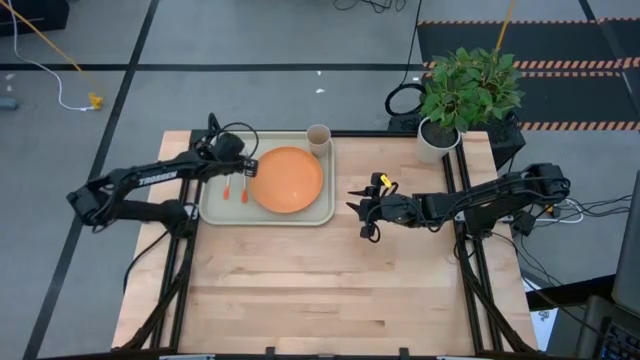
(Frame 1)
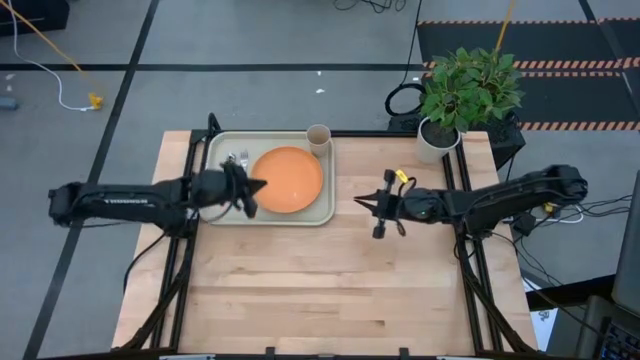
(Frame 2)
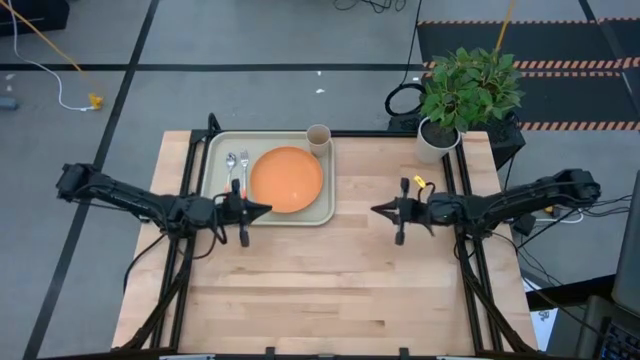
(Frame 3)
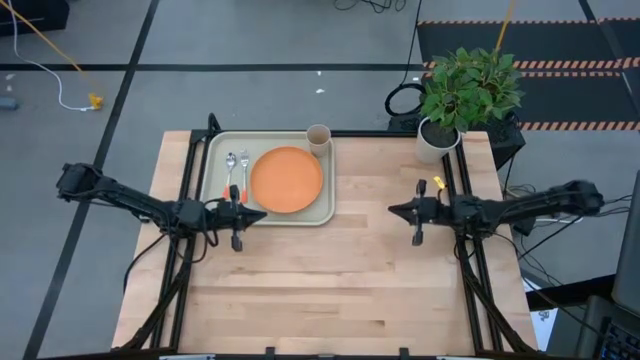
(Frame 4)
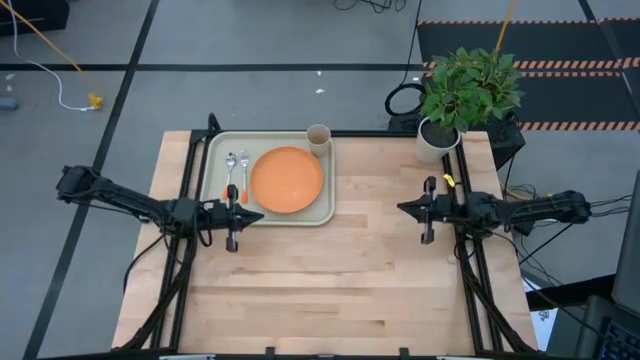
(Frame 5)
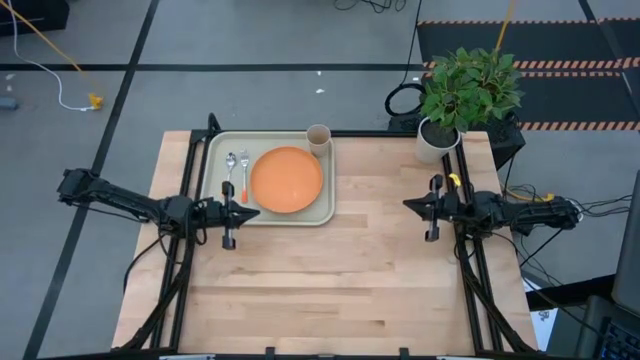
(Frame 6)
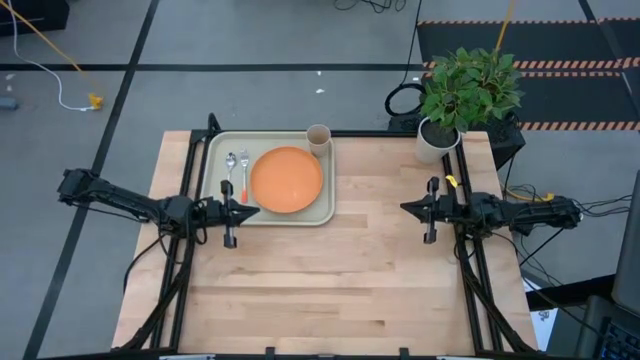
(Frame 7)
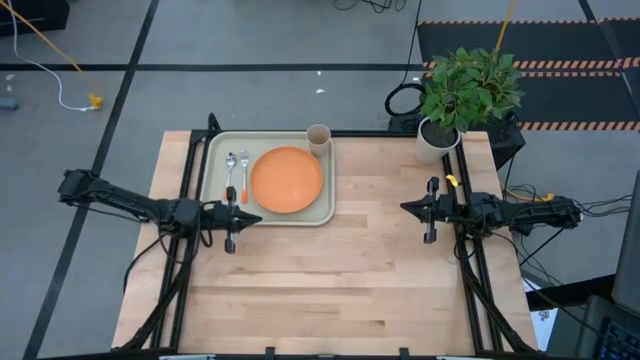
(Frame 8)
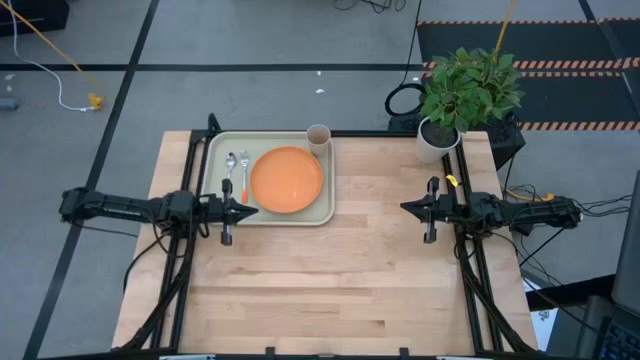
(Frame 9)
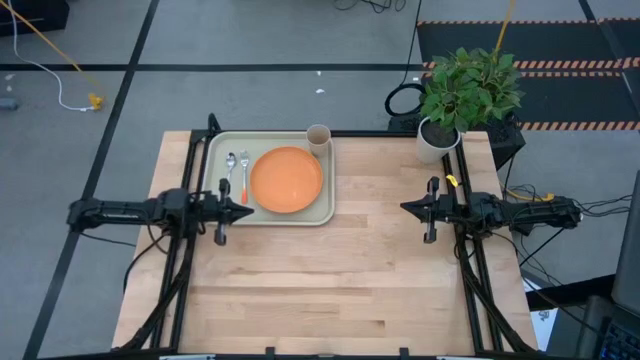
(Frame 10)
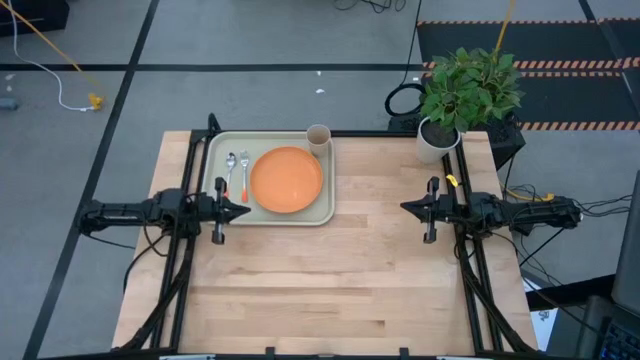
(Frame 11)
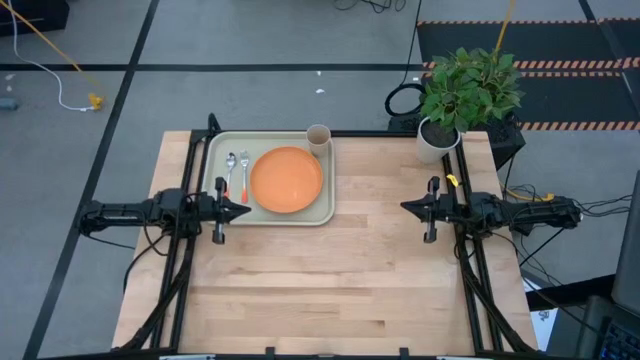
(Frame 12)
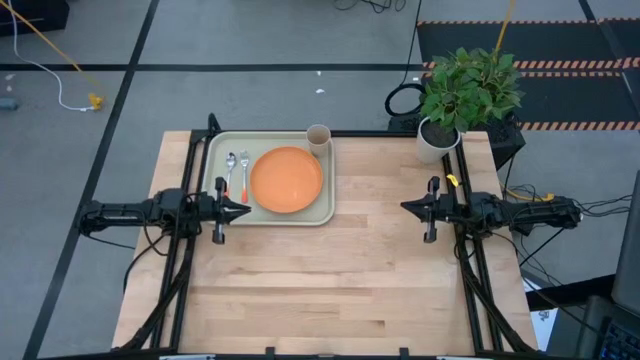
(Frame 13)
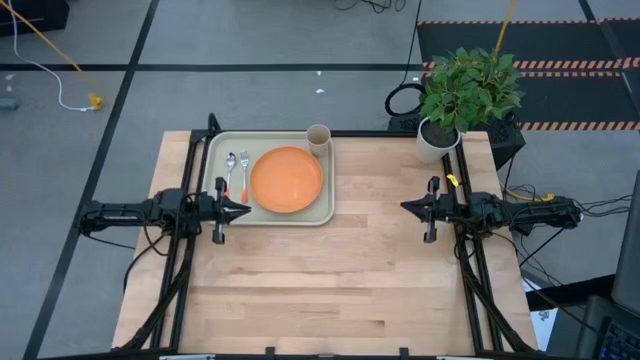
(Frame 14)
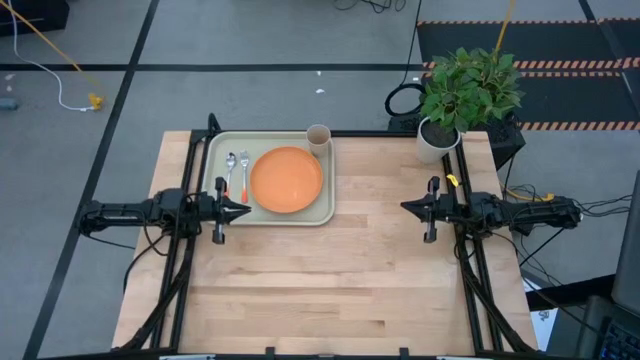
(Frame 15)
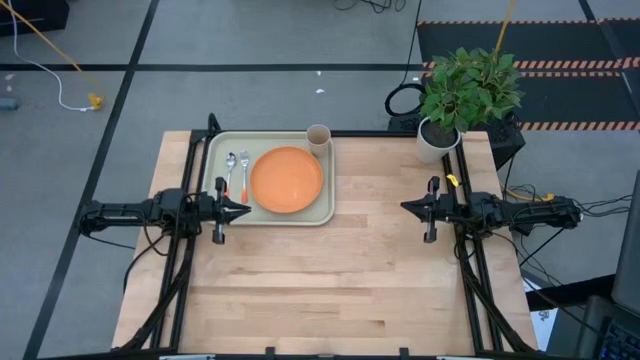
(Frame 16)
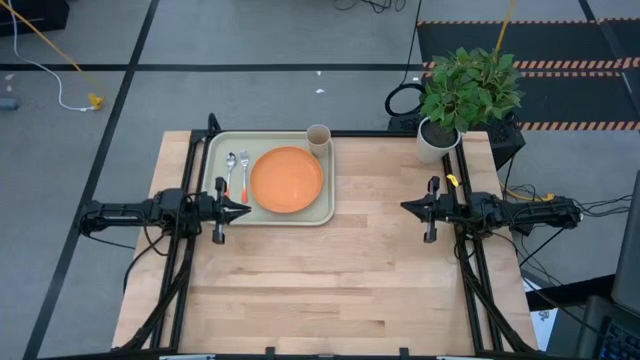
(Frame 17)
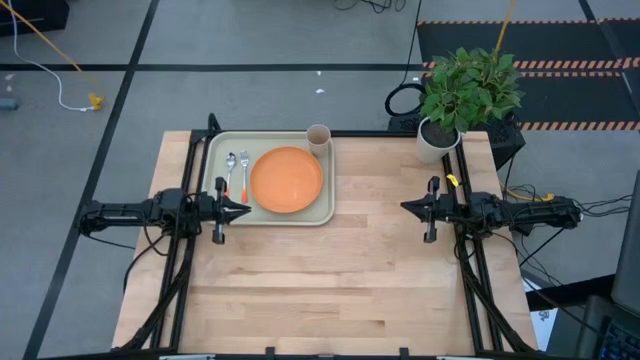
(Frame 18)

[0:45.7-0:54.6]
Task: Pick and place plate/cup/fork/spoon on tray
Return to Home Position

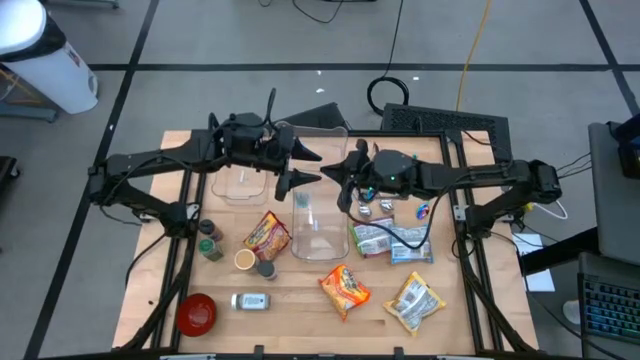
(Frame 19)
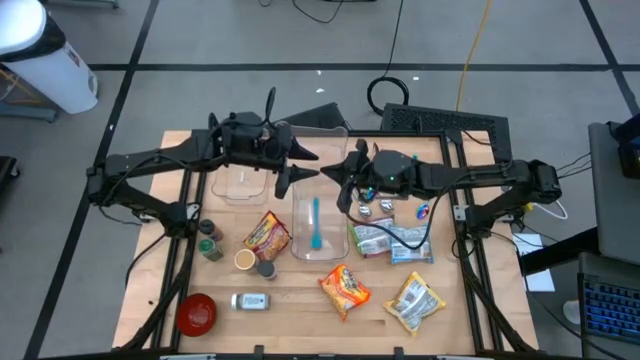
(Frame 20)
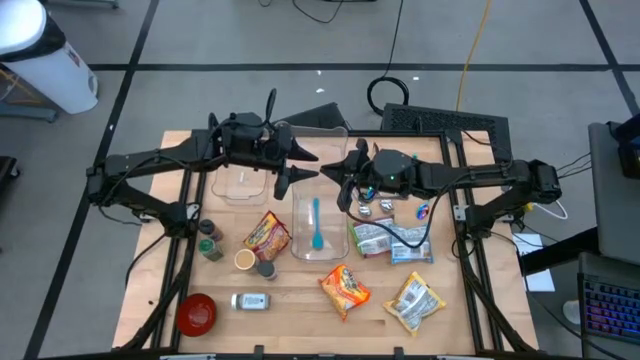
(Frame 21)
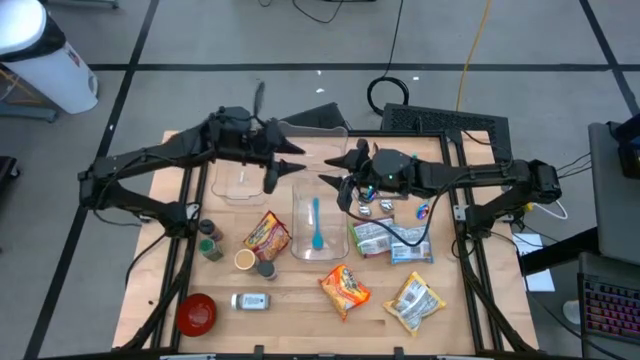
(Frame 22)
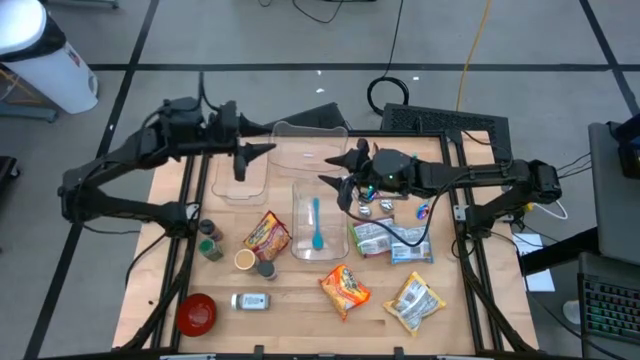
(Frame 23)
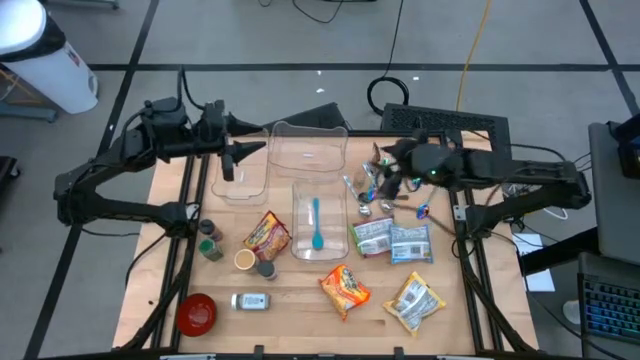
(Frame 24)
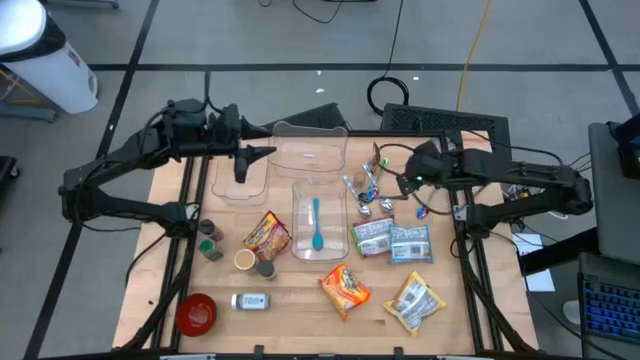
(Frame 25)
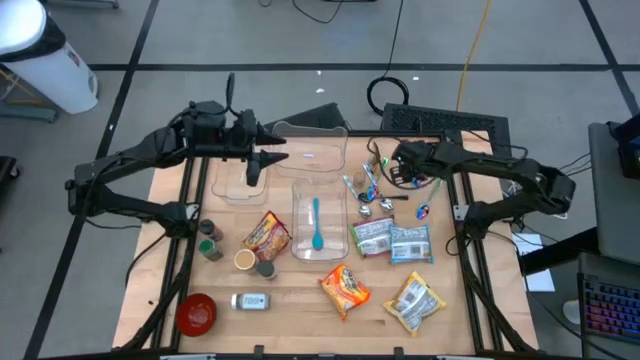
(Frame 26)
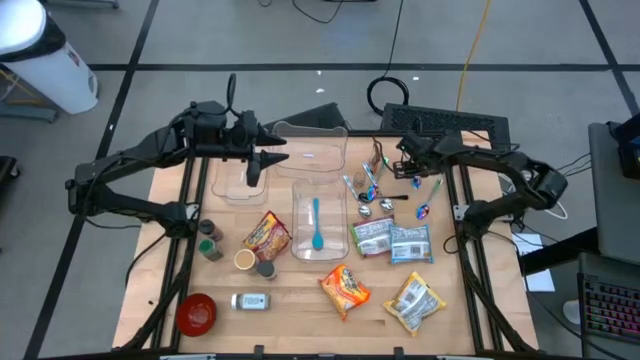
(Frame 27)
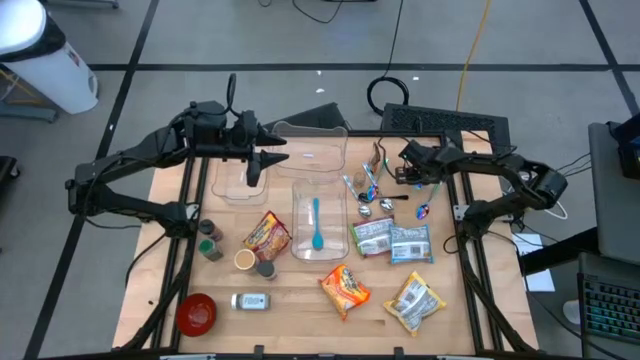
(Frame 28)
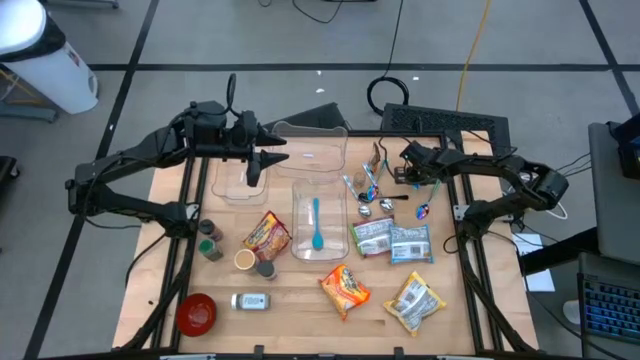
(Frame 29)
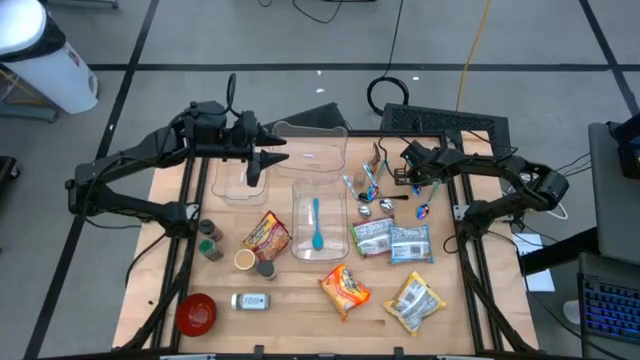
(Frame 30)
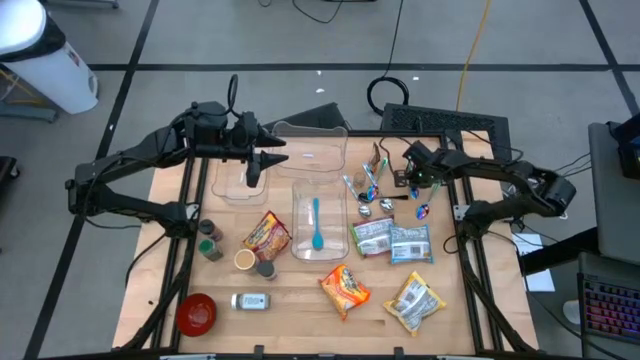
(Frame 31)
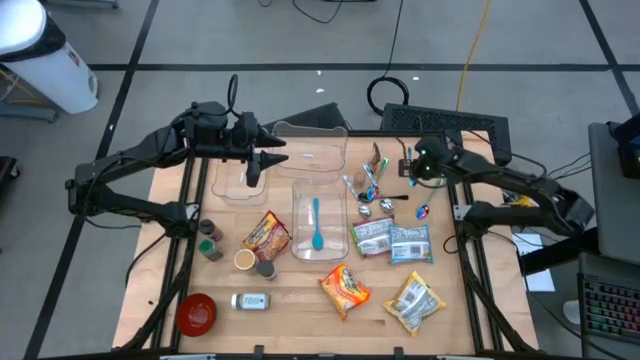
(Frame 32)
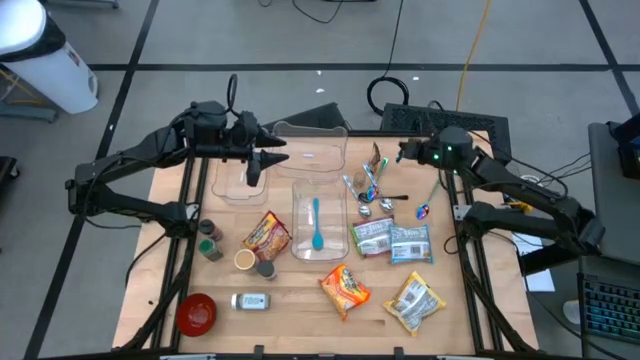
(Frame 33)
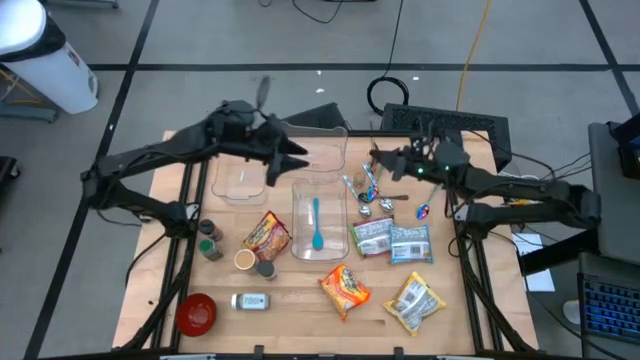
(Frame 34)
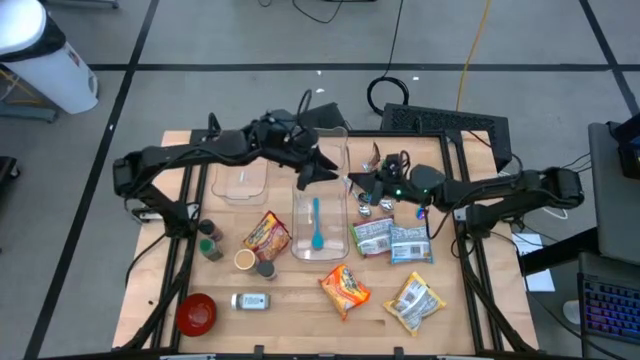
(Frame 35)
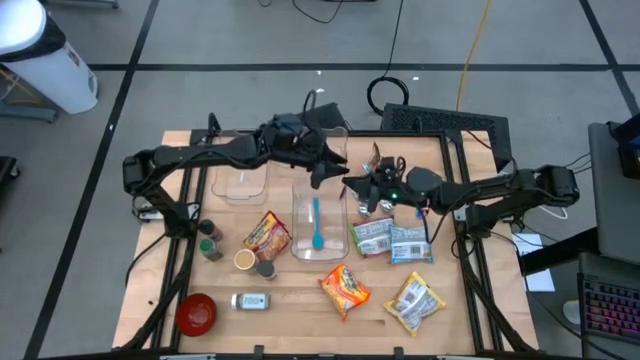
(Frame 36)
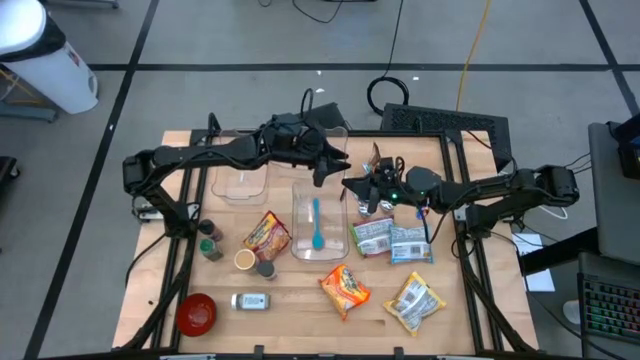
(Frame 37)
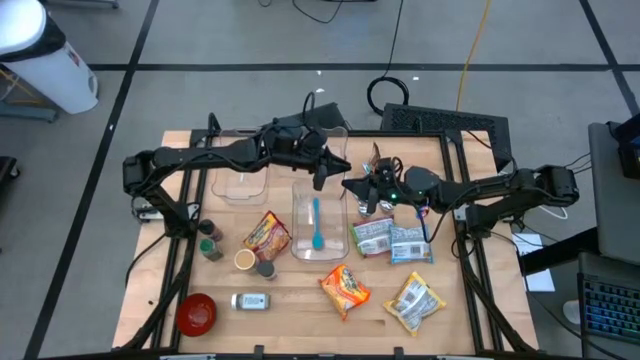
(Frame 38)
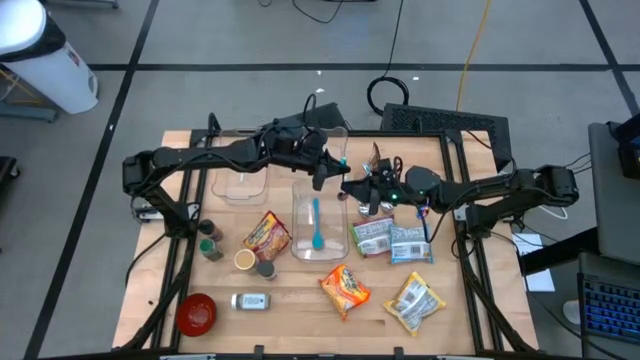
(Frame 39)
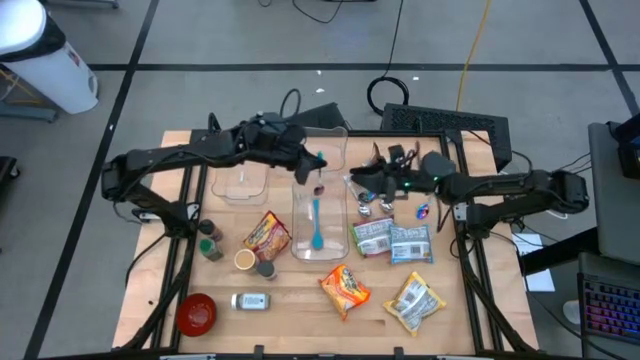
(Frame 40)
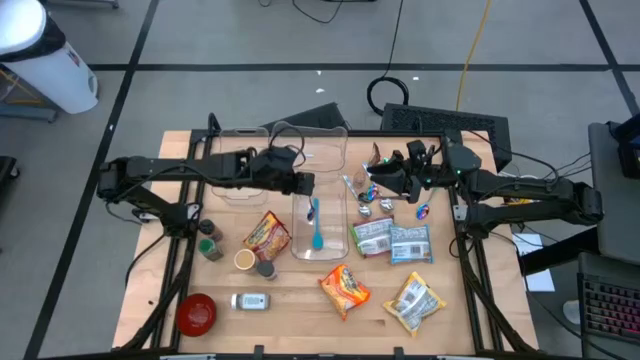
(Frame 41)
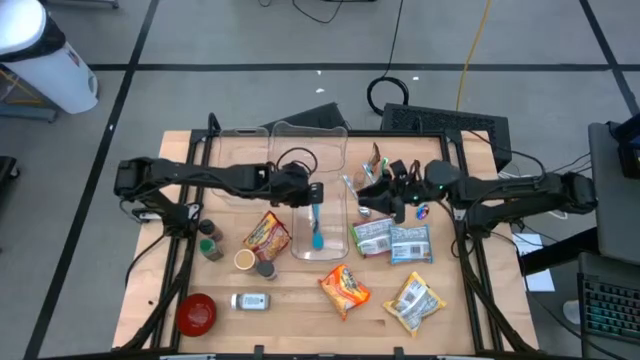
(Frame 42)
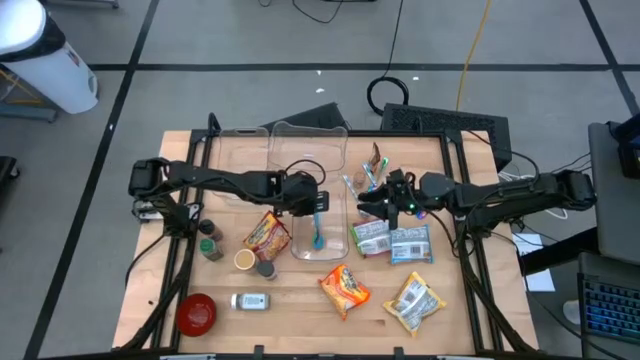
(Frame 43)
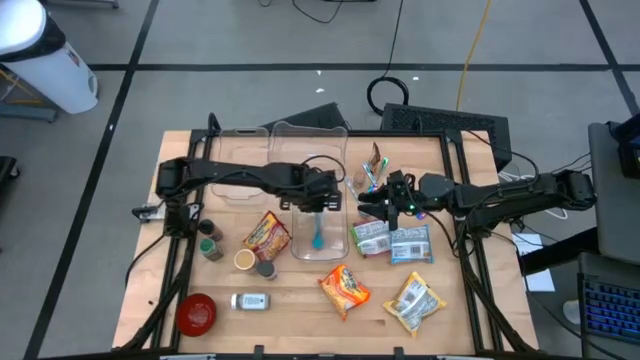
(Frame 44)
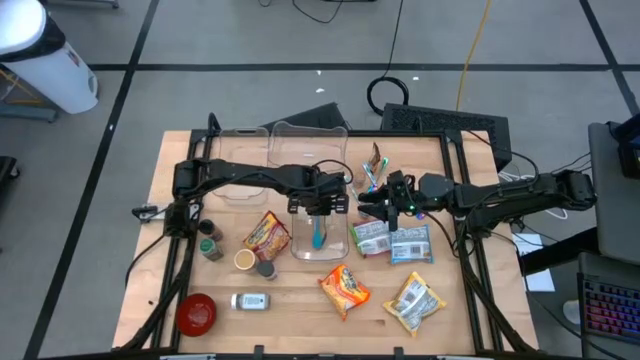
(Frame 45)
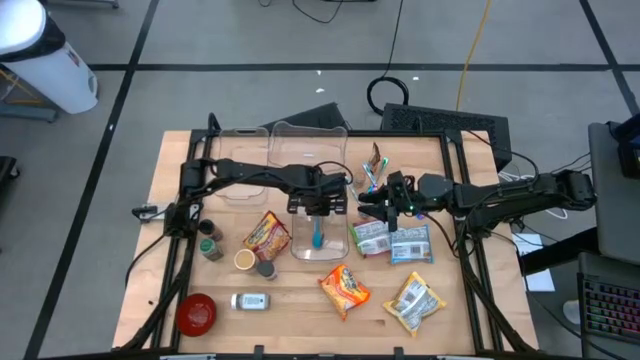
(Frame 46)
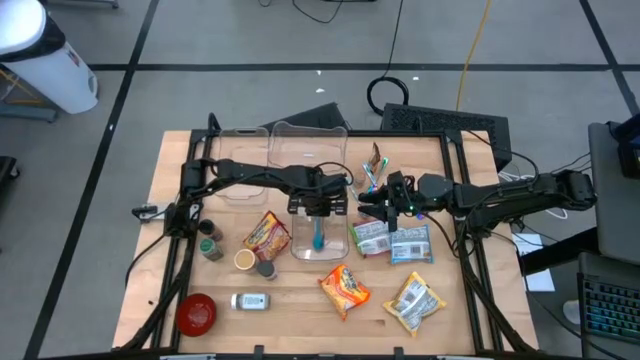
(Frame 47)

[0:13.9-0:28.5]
Task: Pick & Place Food Item
Put the top purple spoon into the bottom right transparent bin
